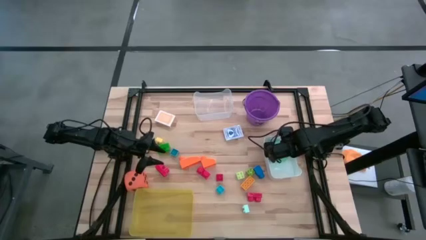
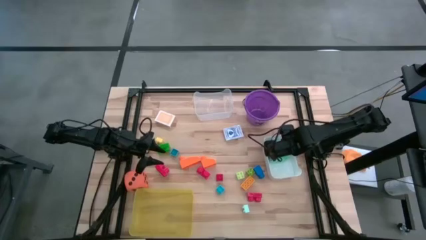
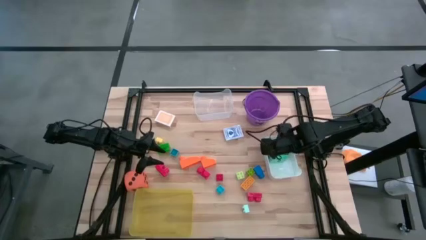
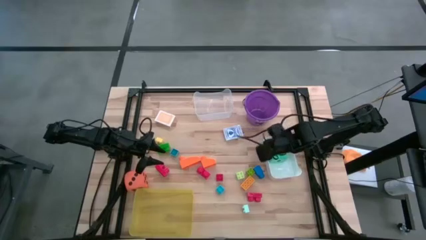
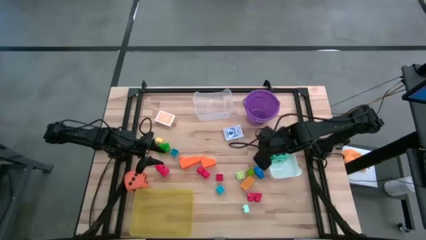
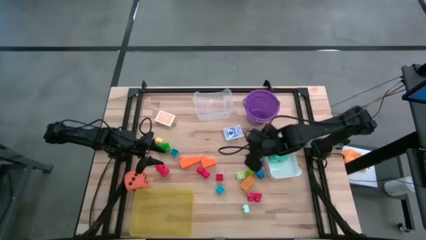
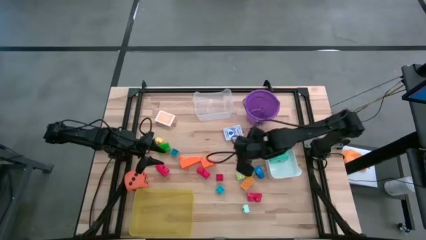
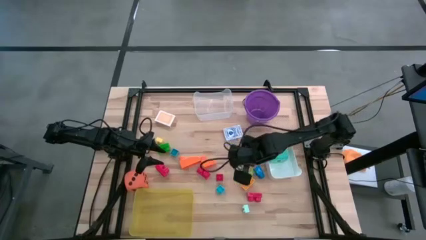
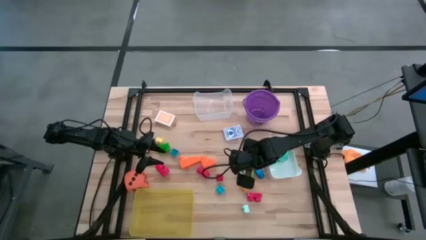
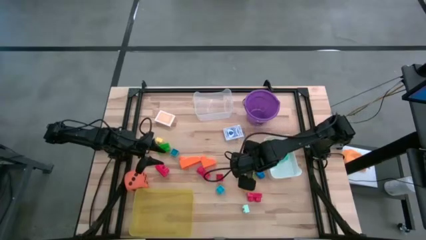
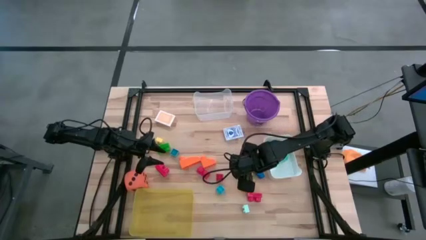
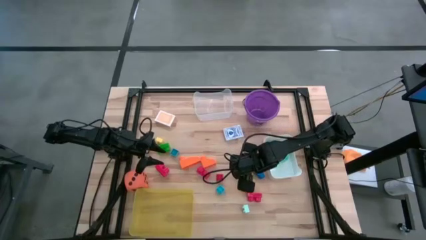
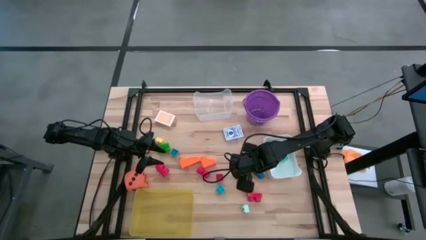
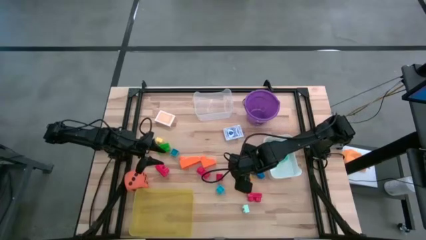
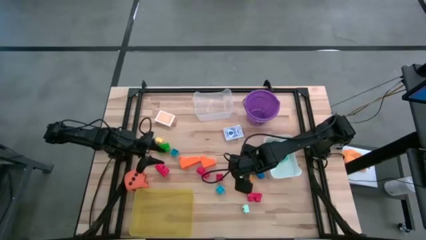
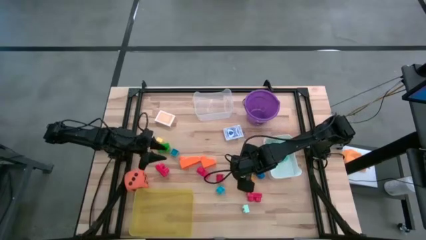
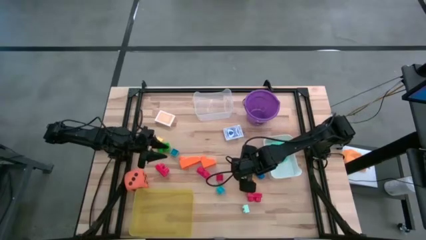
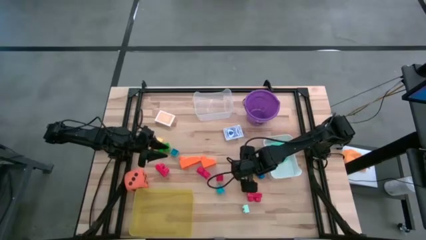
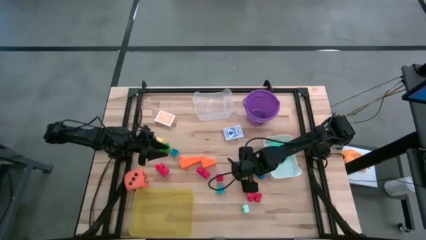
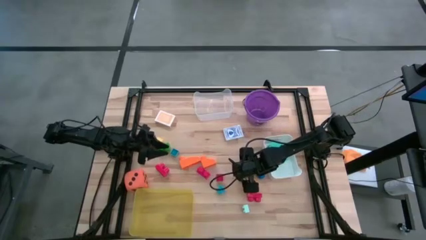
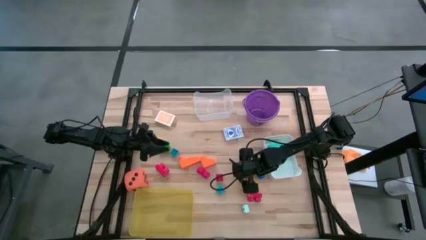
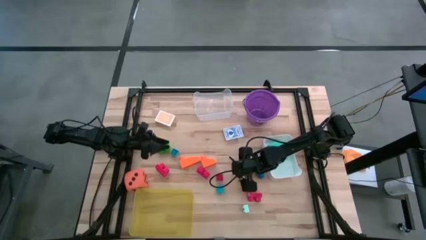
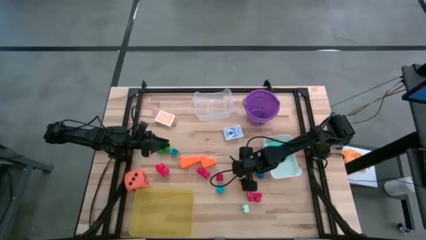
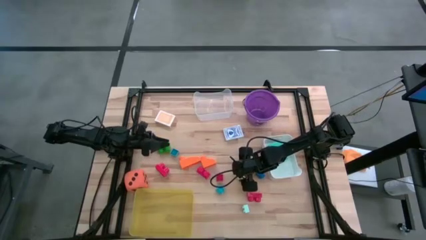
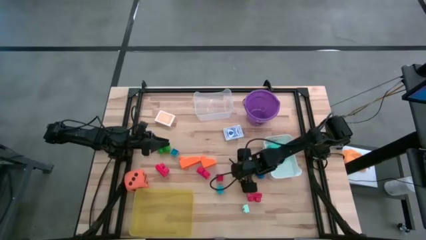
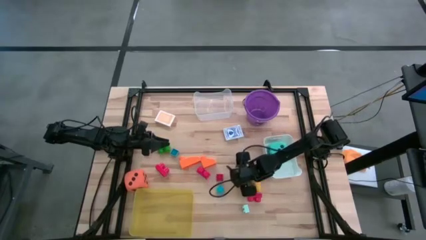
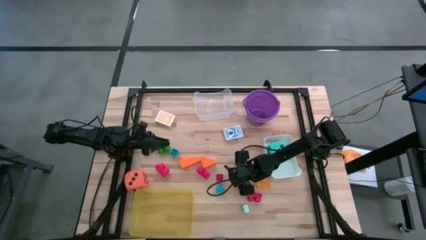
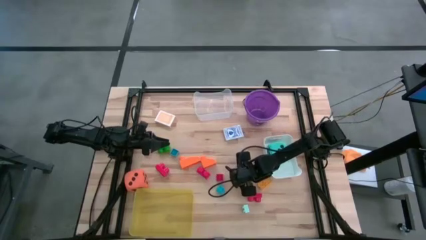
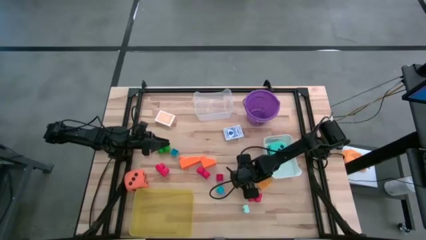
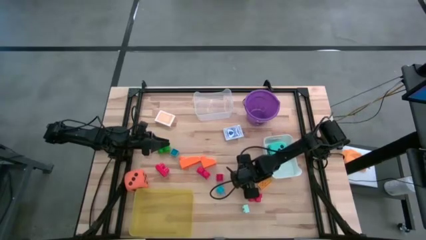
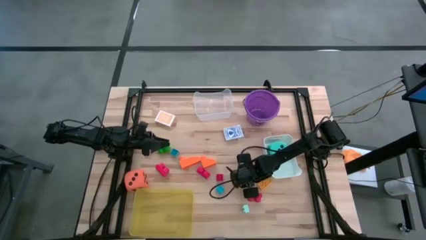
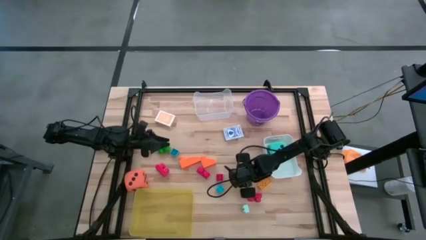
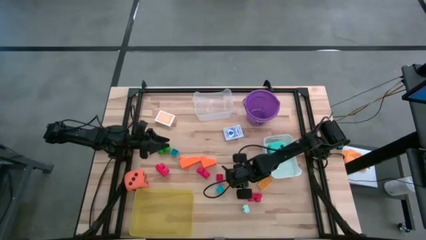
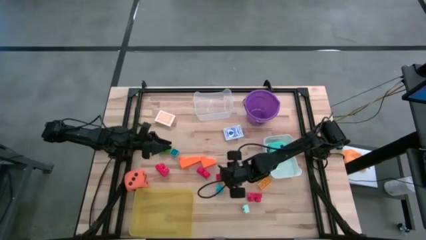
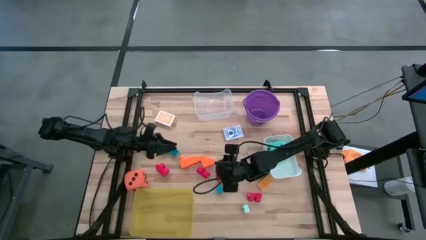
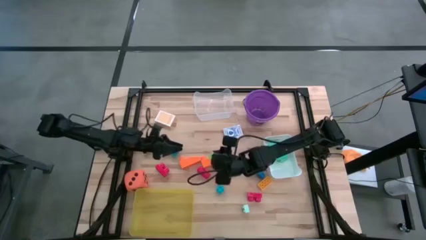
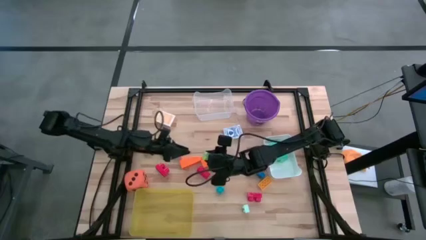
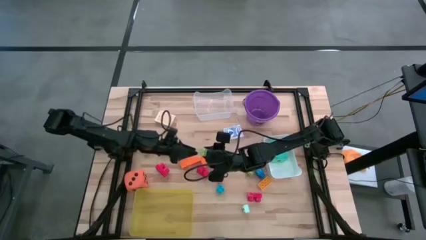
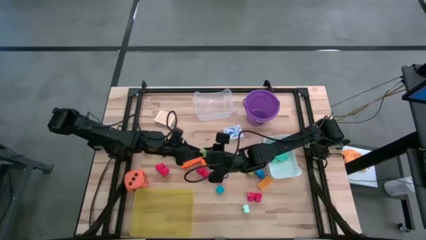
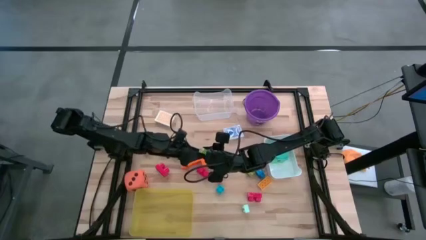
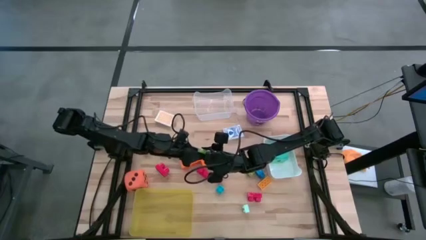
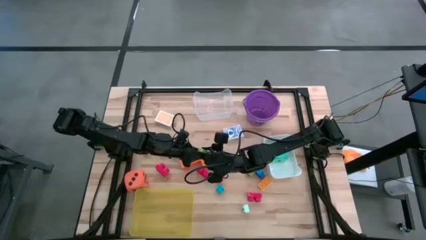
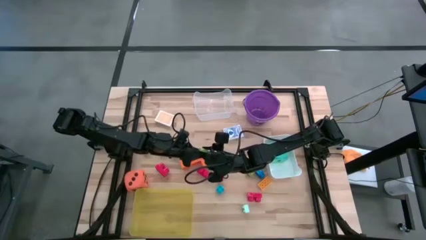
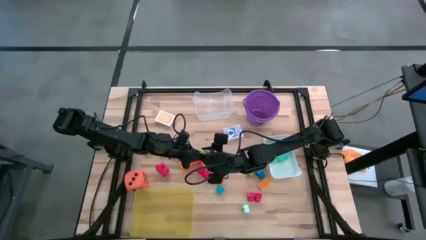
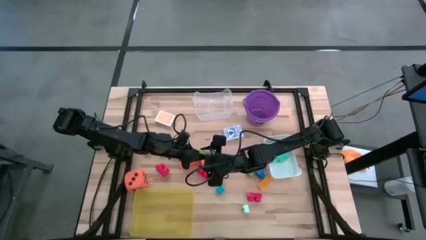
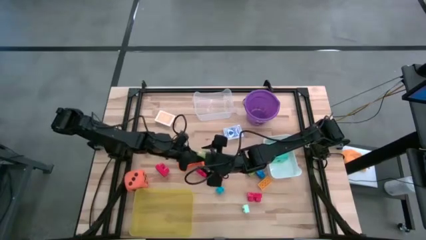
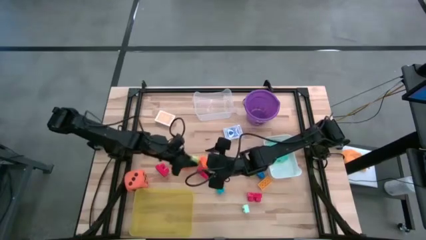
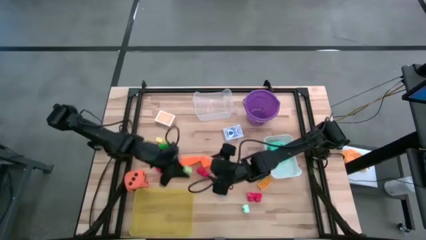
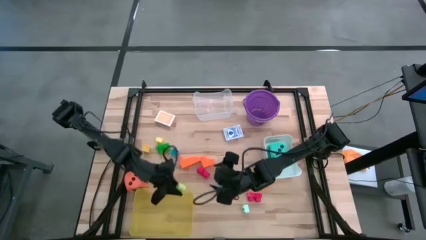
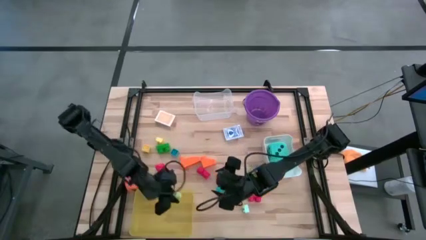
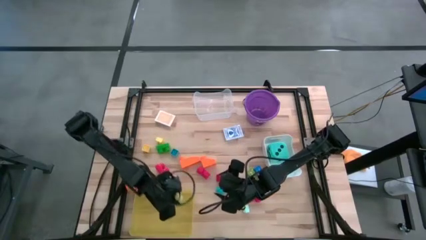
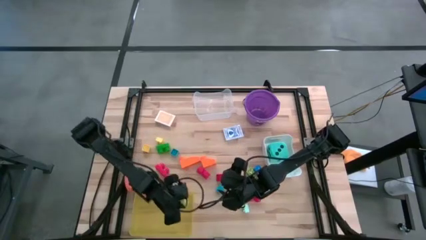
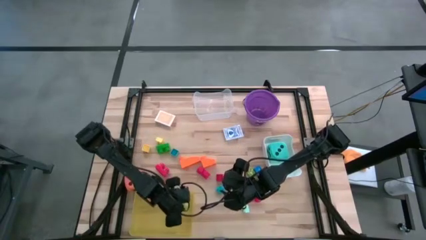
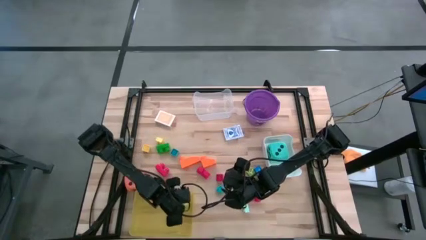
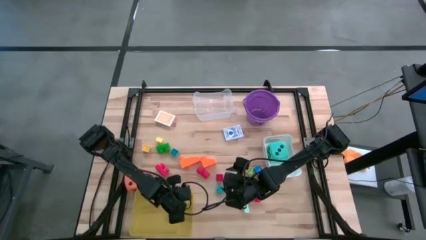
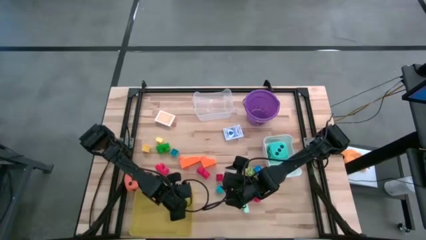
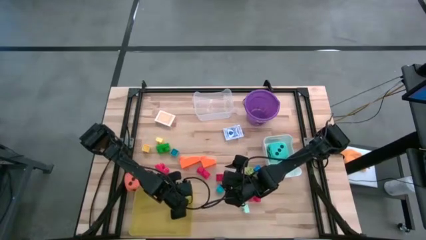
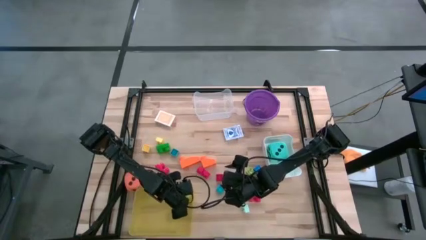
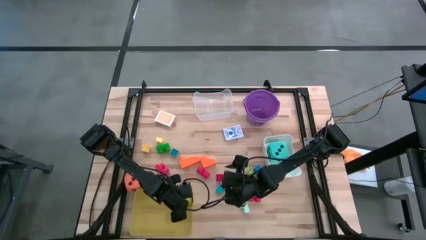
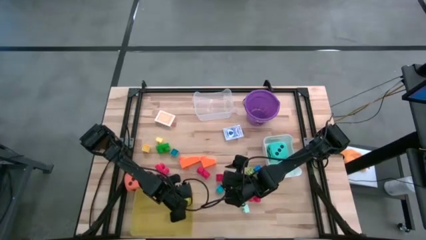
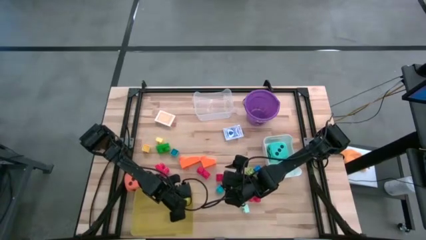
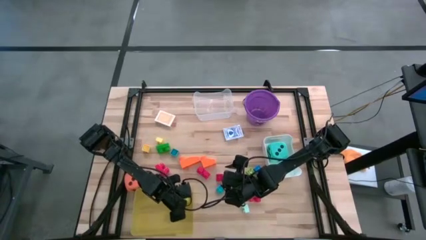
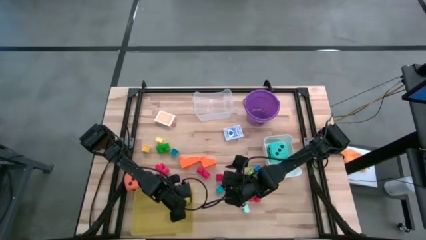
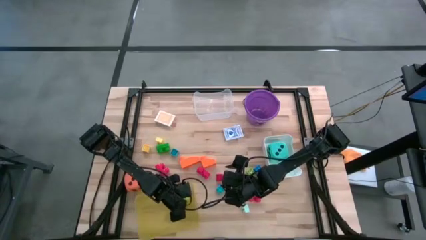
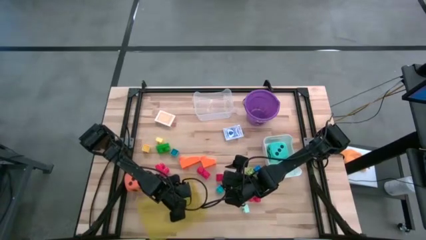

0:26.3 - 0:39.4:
Task: Pick & Place Toys
Put the light green game piece into the yellow bin

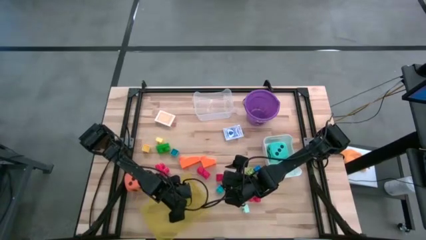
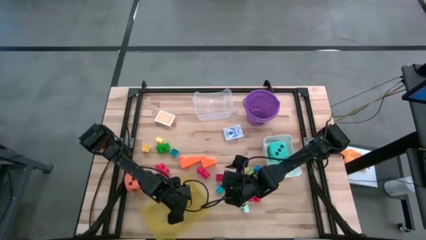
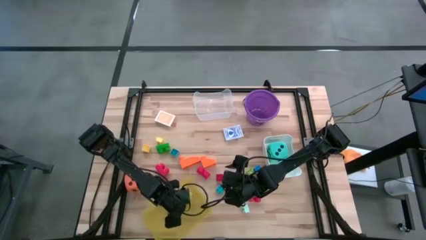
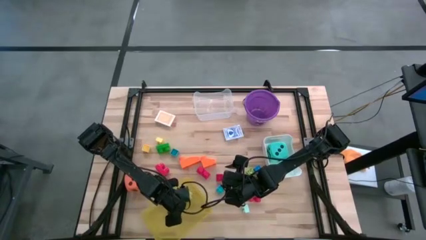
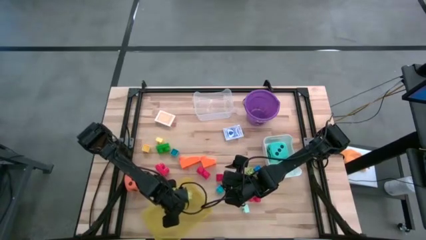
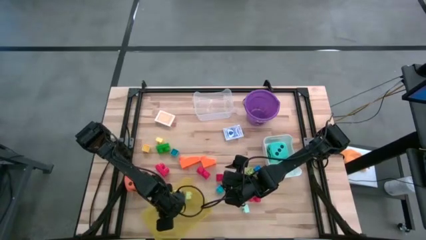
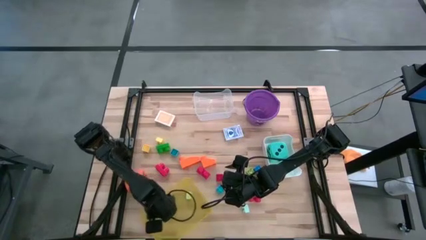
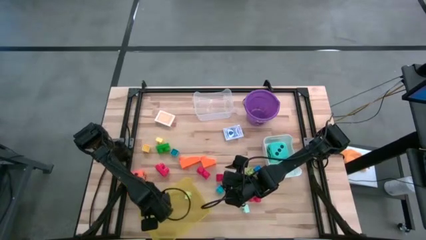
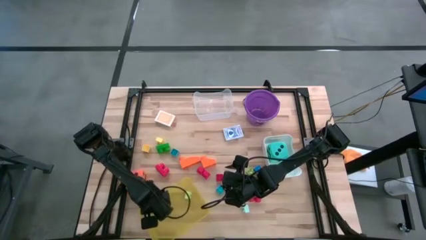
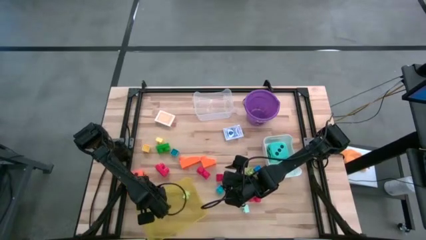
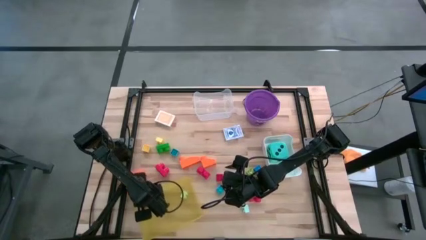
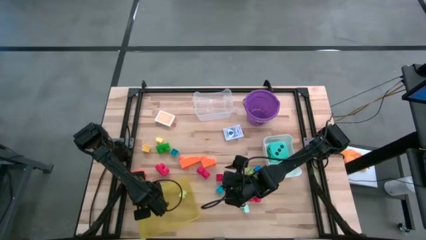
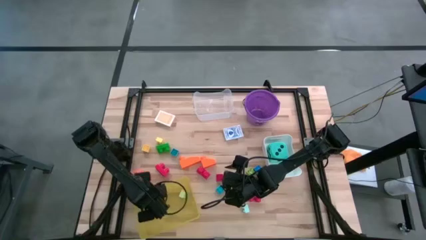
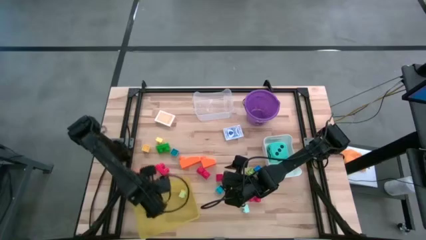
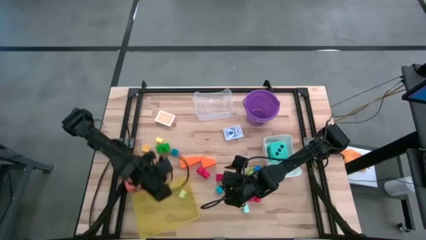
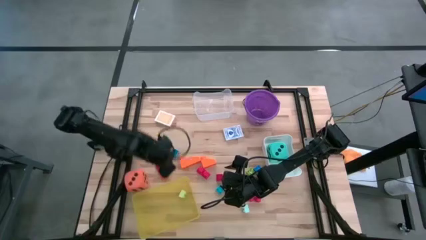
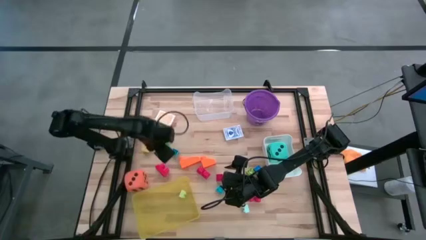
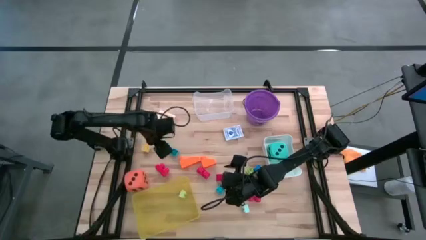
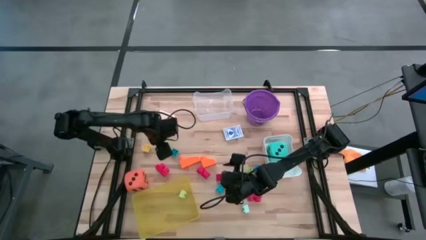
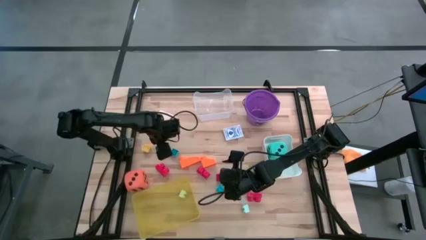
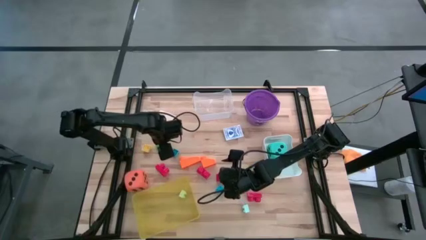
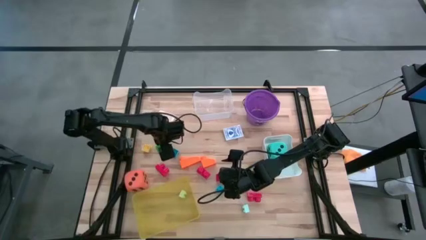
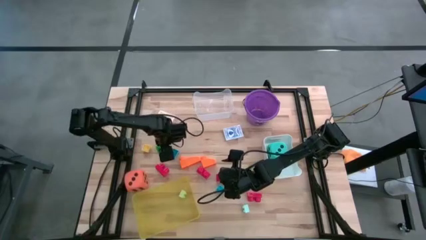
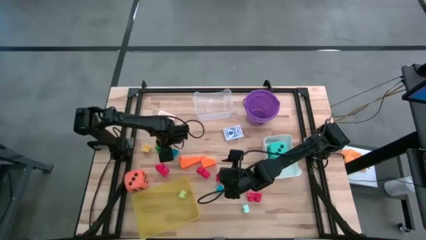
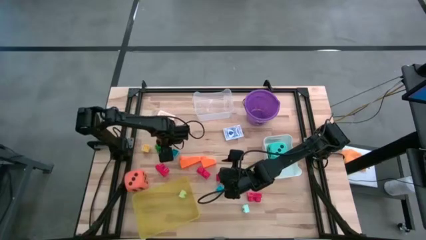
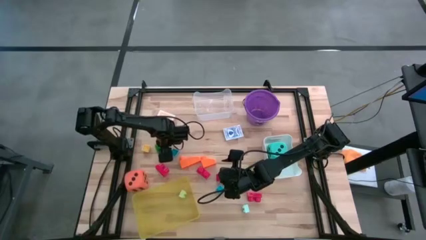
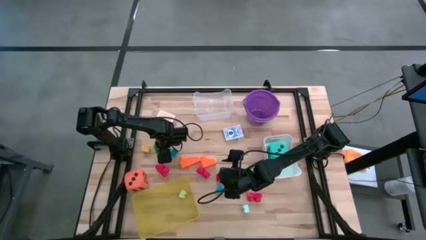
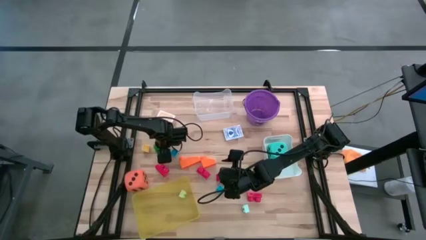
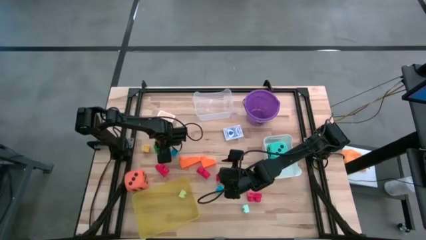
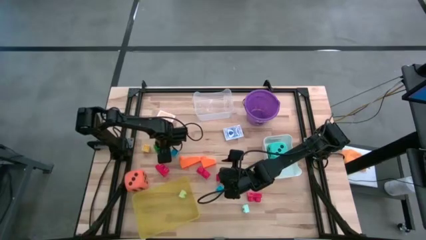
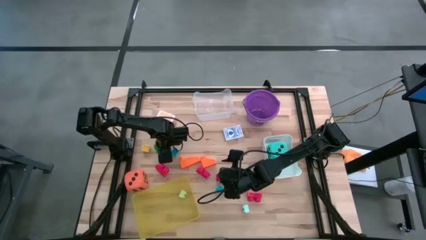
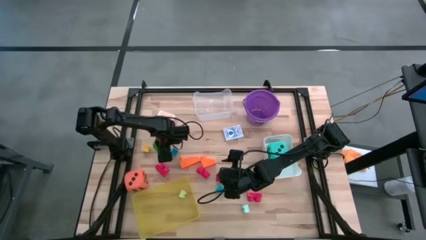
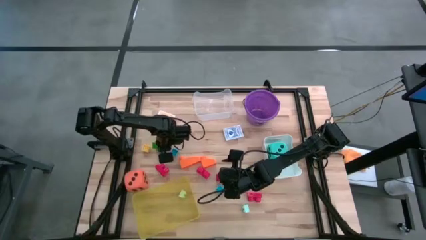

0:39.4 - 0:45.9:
Put the green game piece into the yellow bin
